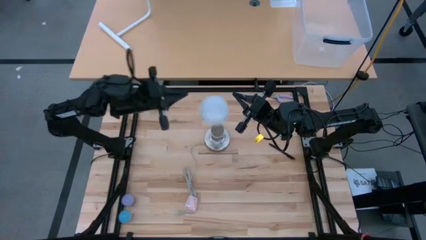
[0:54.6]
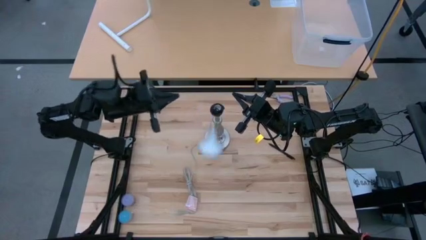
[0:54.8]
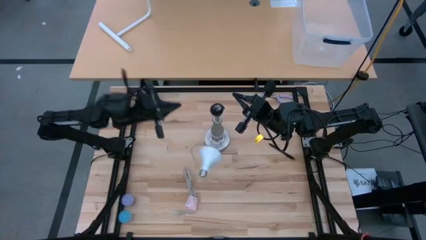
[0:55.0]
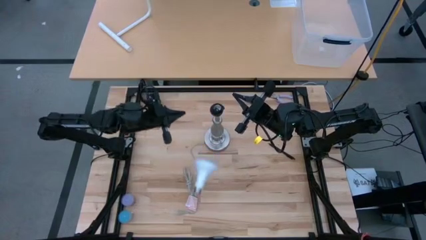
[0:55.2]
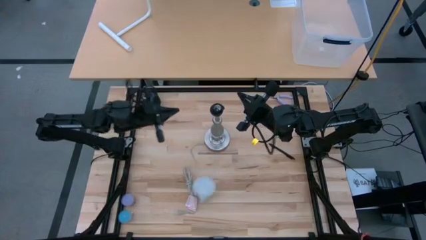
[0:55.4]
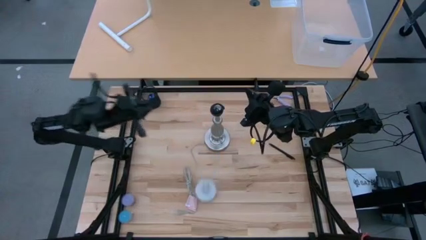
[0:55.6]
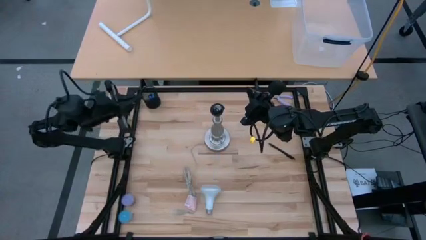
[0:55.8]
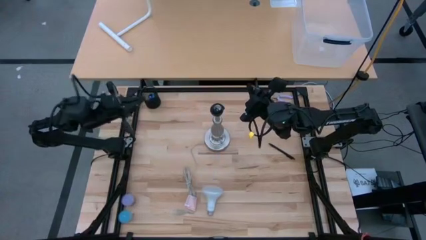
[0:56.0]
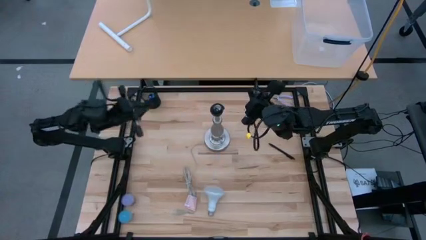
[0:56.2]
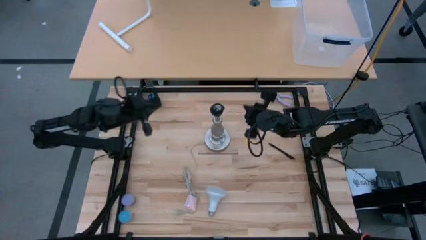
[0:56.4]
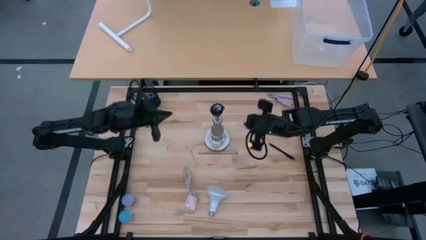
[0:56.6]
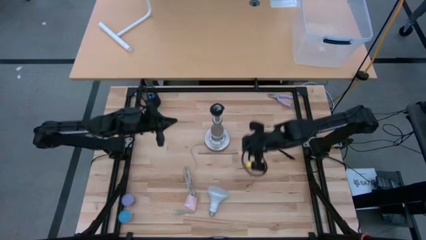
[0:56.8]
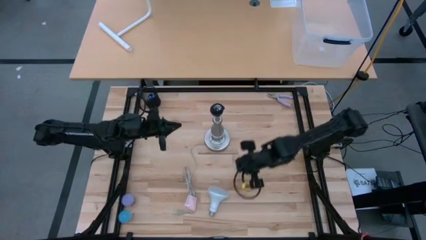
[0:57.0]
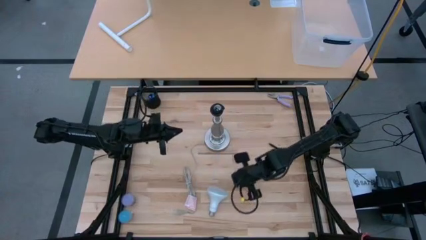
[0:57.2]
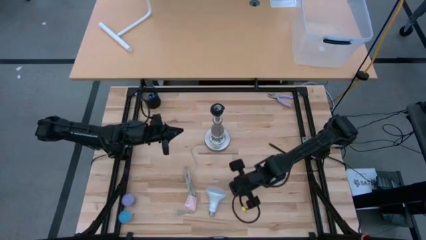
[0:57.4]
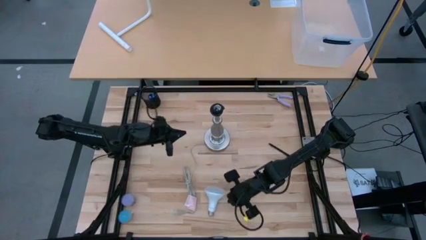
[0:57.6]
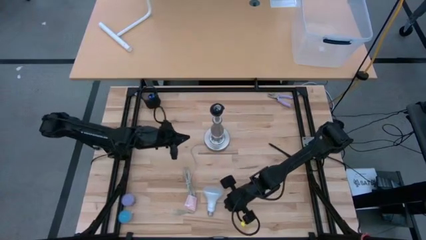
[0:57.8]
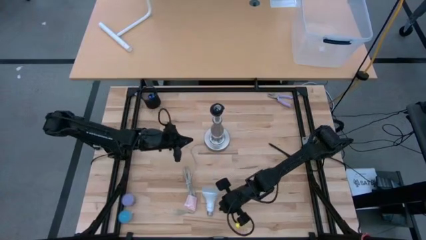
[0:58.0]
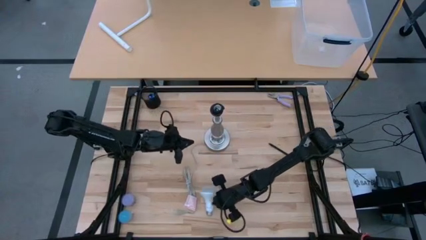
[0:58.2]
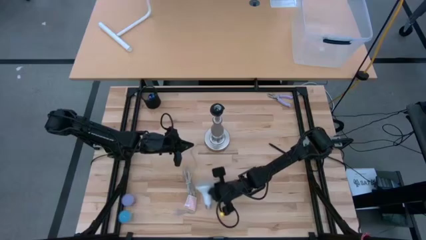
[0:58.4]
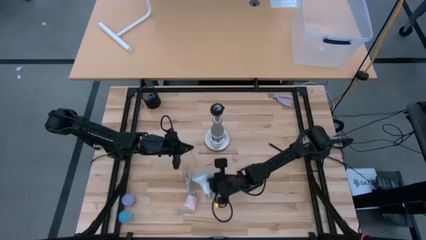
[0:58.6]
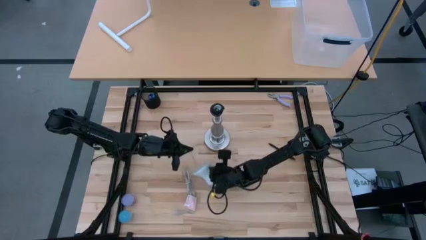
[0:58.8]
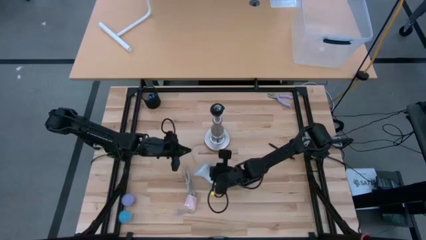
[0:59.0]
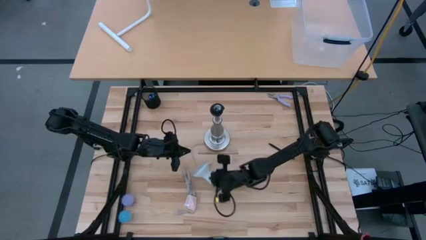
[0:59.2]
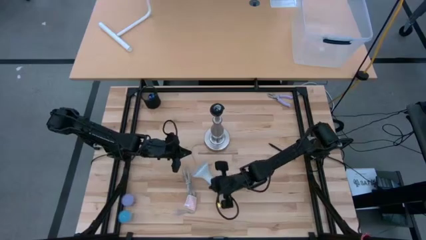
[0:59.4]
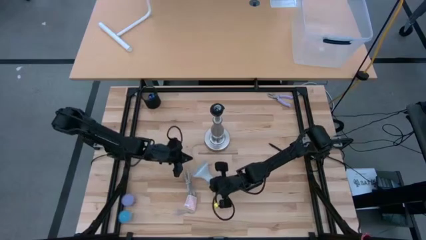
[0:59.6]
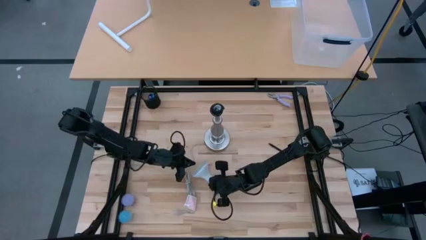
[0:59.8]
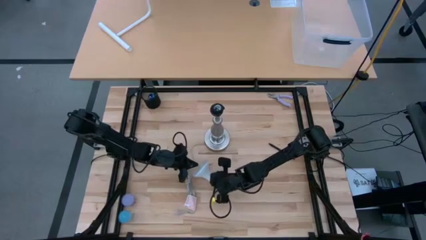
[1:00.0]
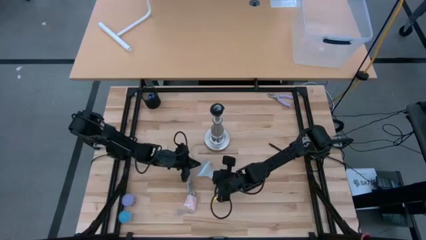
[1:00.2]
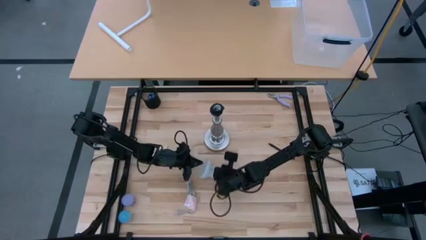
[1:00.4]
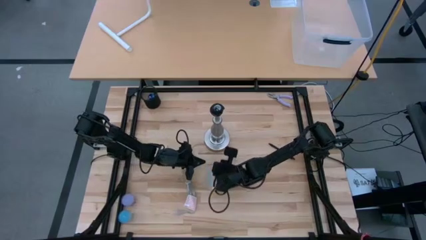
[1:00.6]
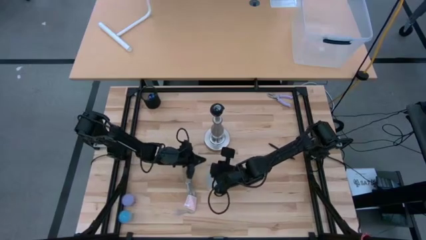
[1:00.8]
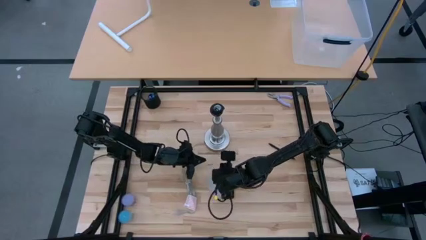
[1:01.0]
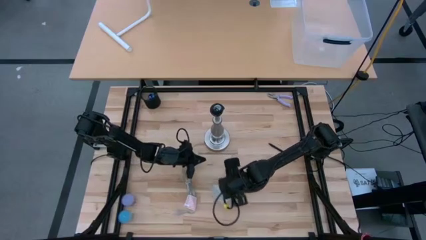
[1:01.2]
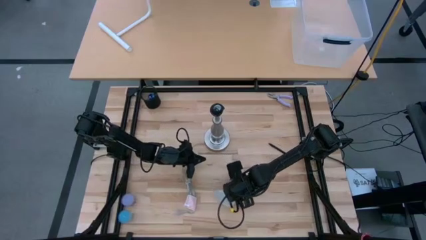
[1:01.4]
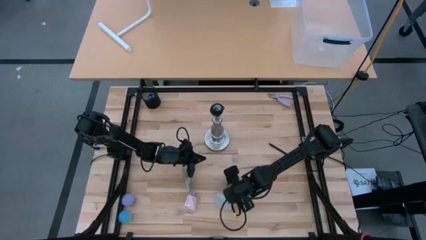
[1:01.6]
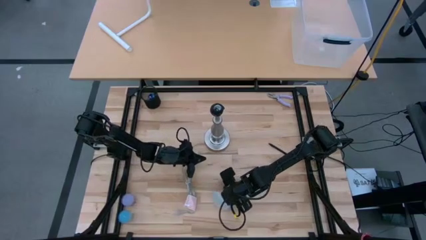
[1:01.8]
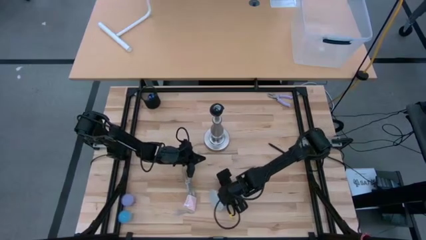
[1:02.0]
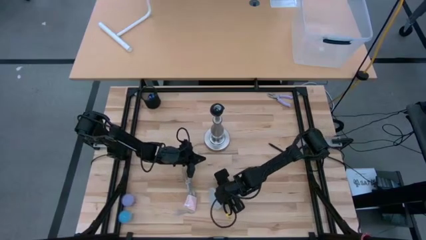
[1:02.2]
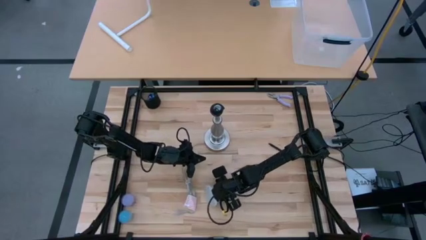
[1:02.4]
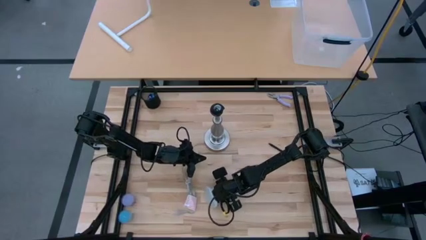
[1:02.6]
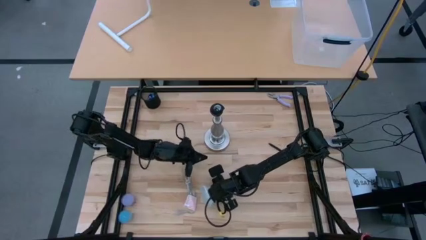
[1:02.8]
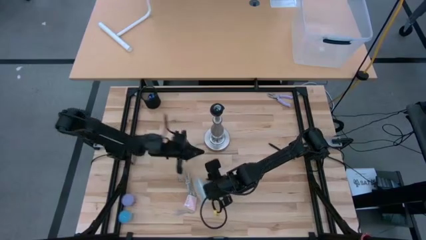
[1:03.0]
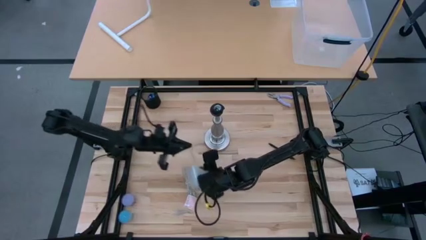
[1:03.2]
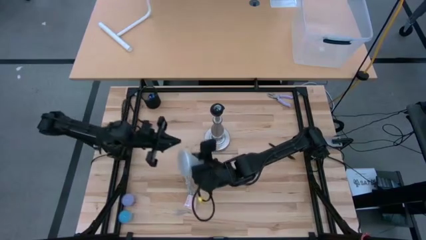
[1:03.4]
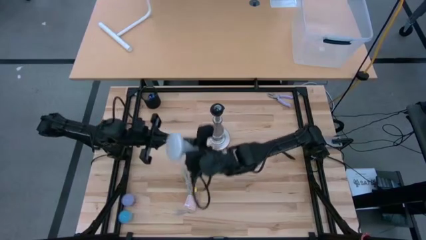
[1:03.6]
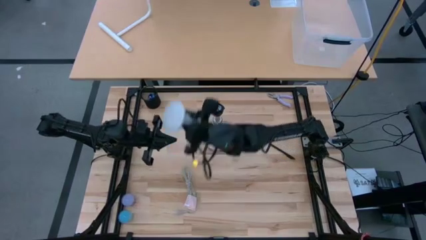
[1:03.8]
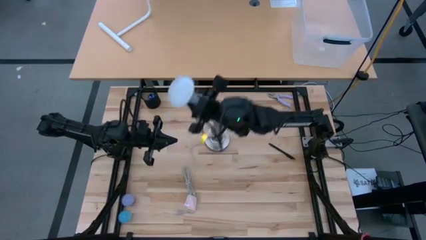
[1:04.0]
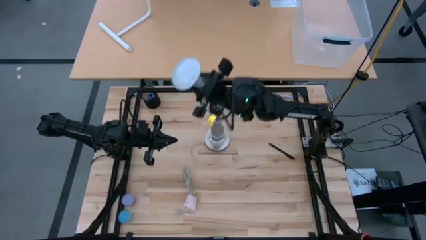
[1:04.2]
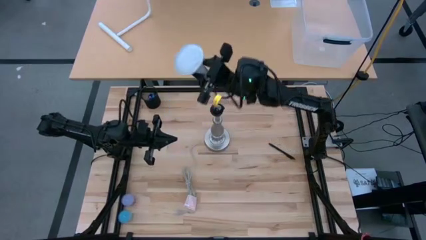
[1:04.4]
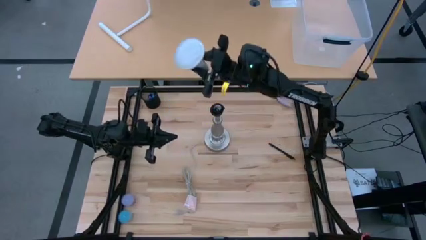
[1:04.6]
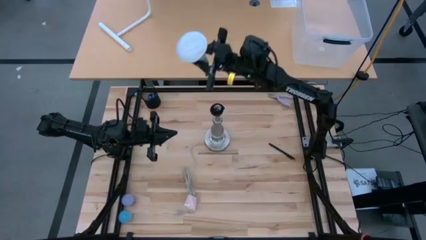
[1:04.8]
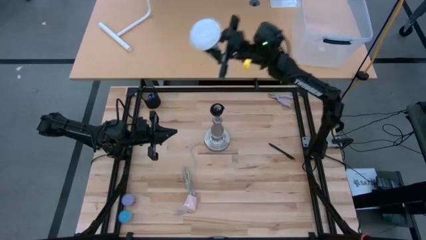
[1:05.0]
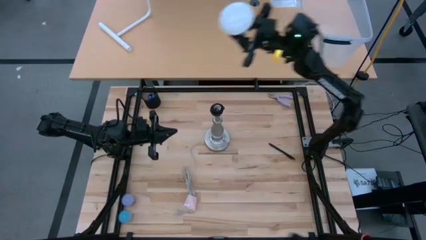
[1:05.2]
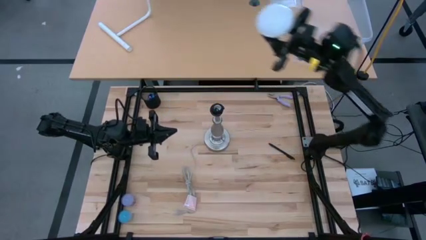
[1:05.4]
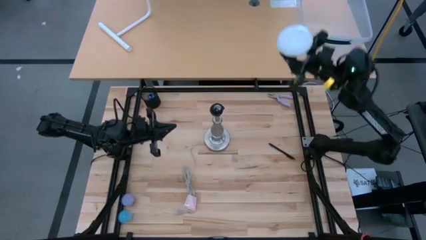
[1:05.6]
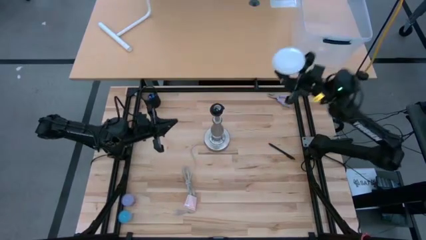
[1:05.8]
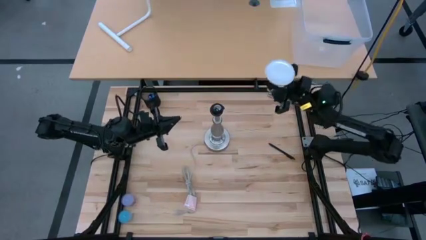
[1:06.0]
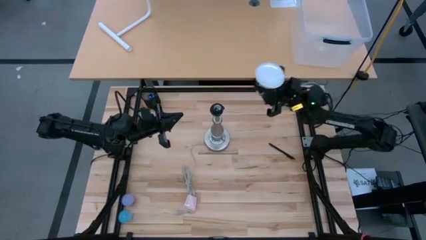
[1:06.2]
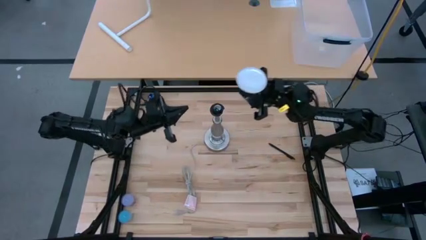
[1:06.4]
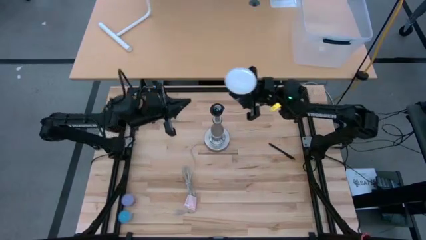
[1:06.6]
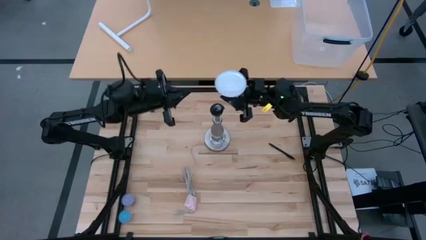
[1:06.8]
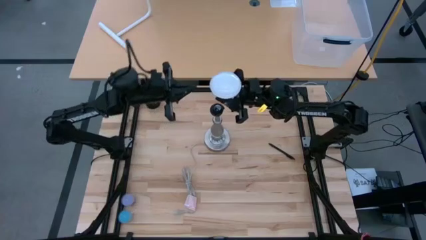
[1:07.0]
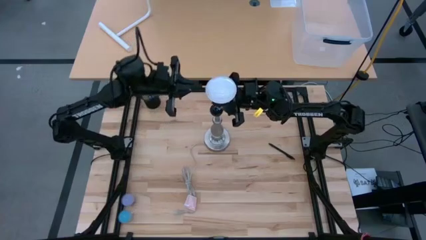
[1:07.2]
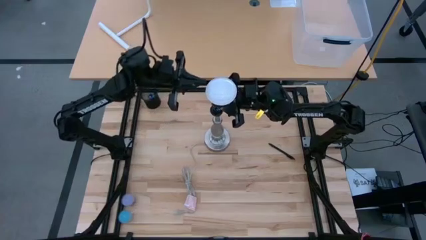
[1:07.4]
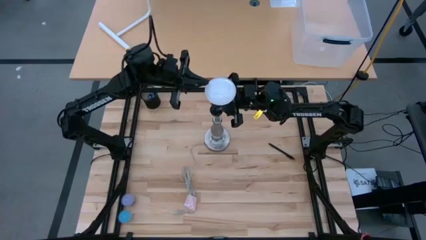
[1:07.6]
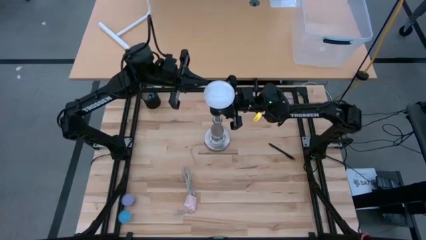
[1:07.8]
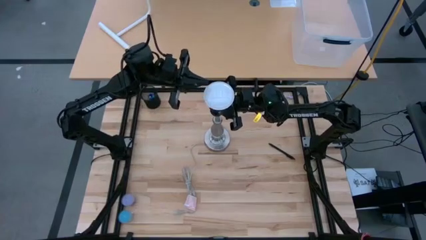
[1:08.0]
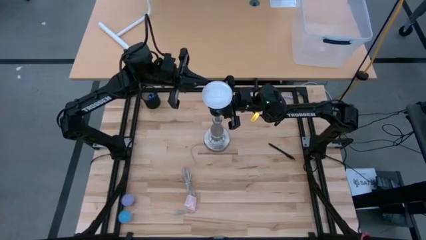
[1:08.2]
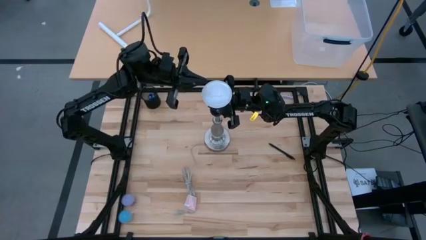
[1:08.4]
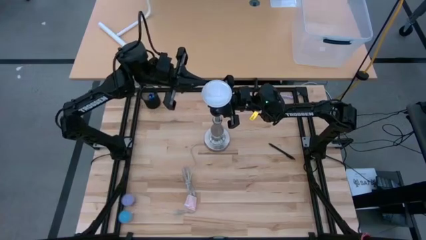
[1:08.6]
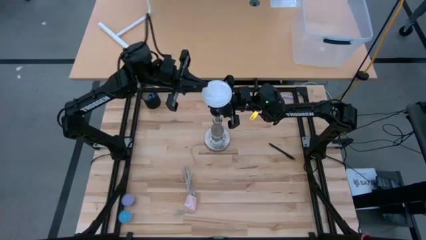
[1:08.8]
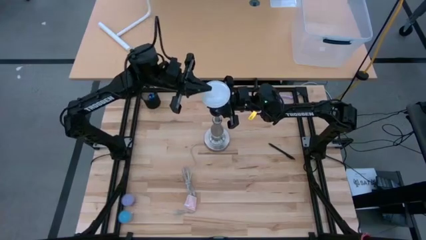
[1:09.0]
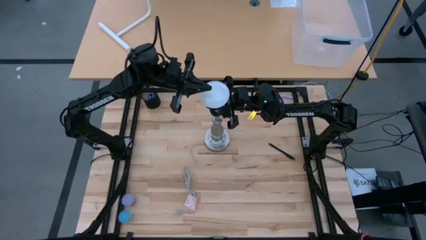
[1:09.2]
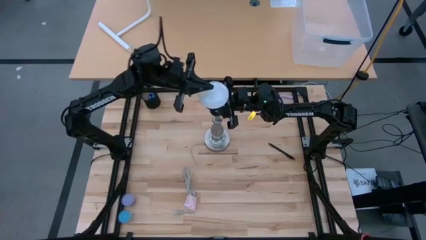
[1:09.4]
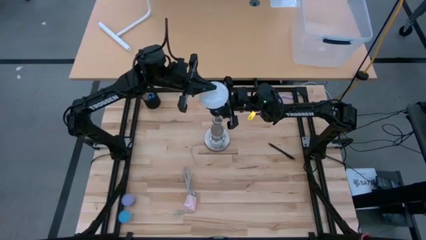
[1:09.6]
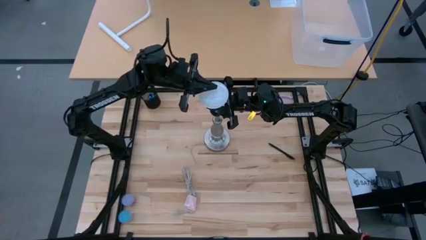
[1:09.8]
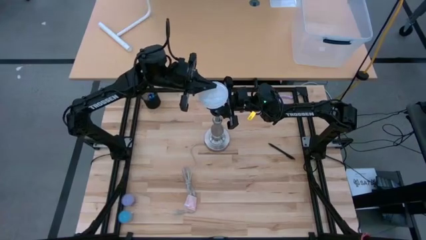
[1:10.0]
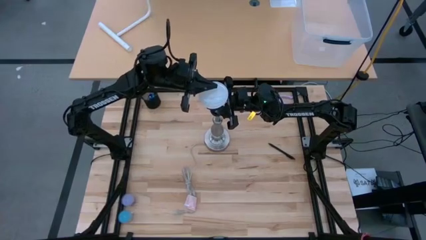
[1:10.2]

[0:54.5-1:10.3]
Task: Screw lightbulb
Insert the lightbulb into the lamp
